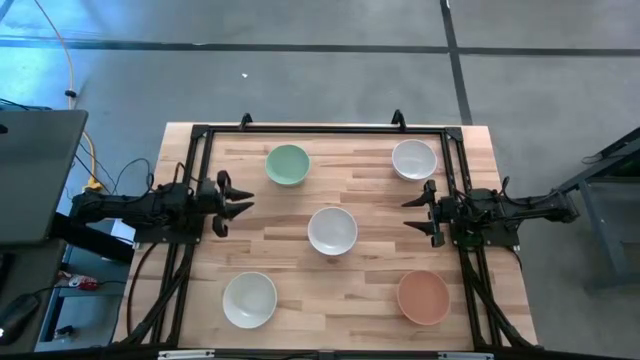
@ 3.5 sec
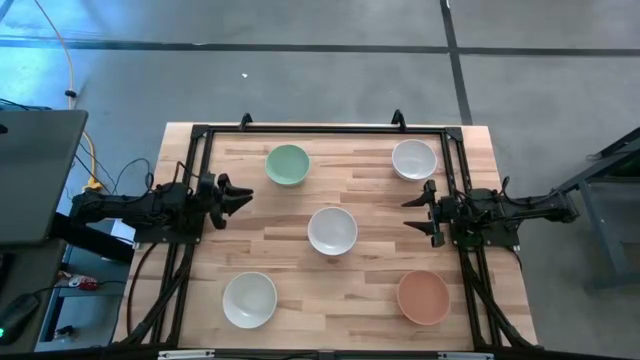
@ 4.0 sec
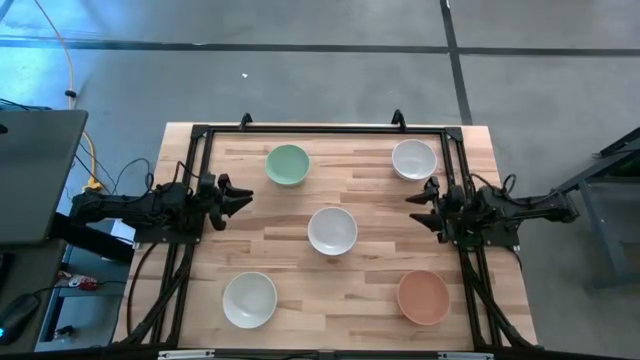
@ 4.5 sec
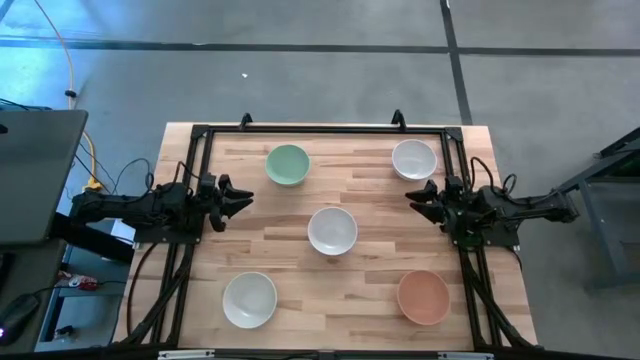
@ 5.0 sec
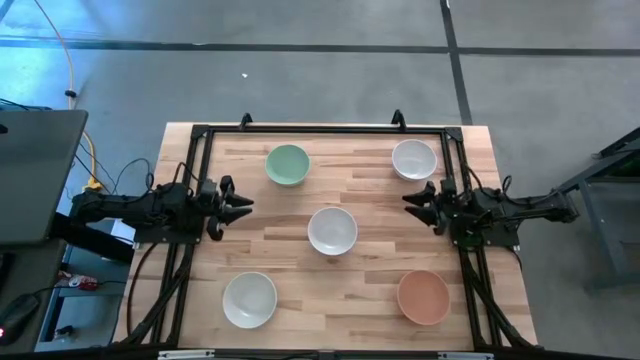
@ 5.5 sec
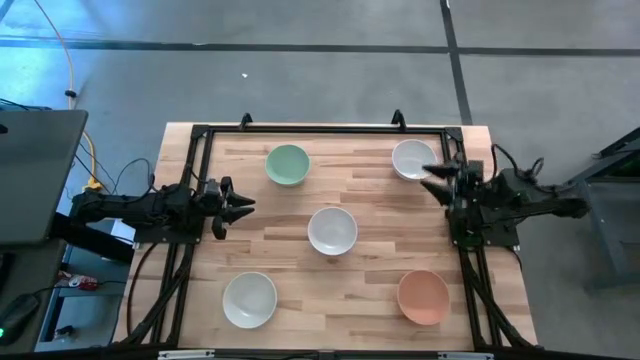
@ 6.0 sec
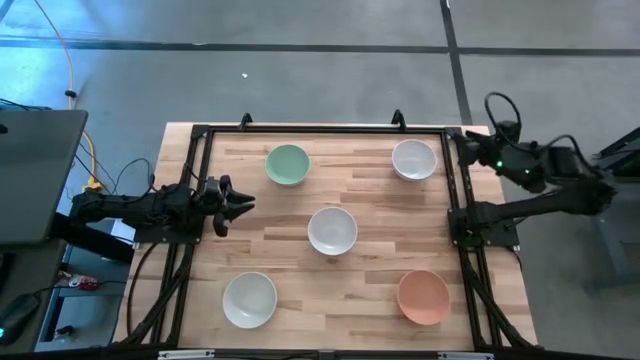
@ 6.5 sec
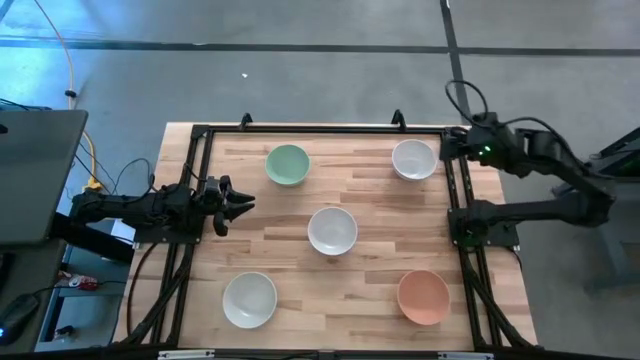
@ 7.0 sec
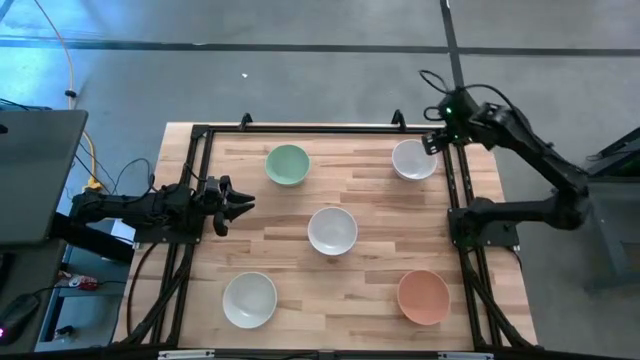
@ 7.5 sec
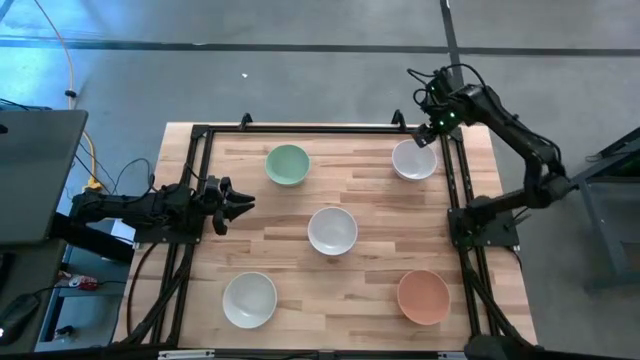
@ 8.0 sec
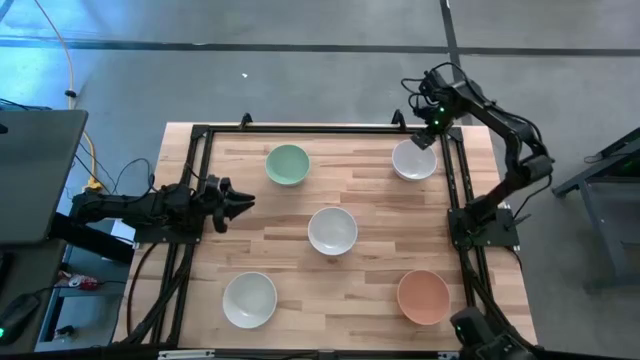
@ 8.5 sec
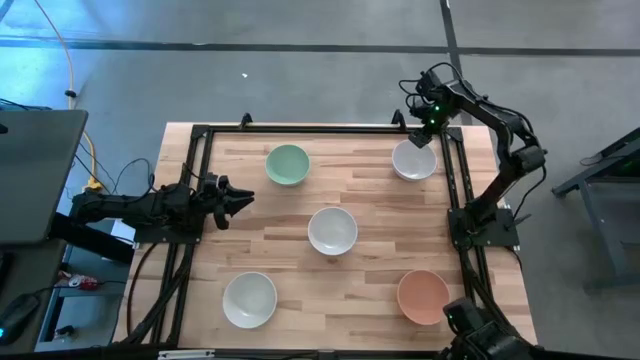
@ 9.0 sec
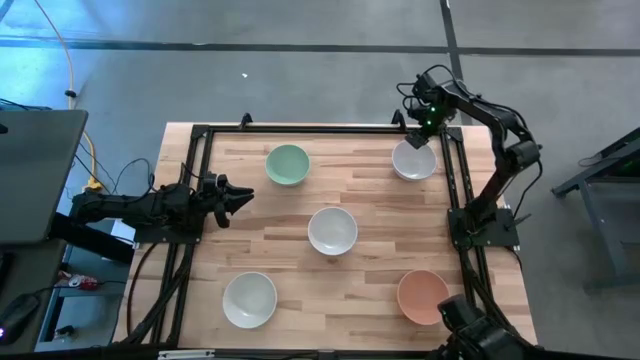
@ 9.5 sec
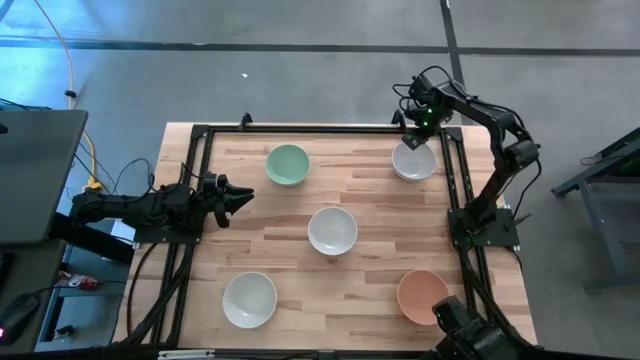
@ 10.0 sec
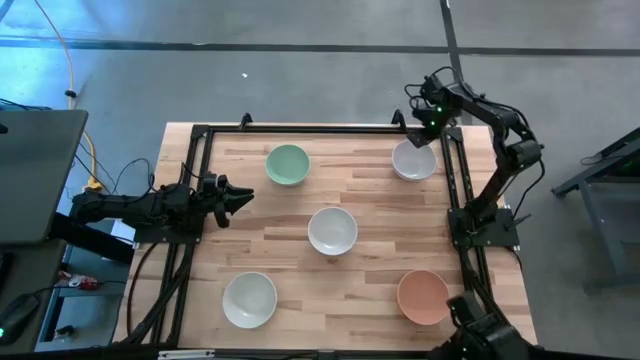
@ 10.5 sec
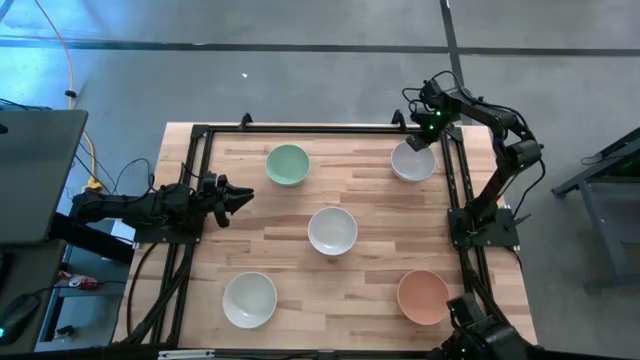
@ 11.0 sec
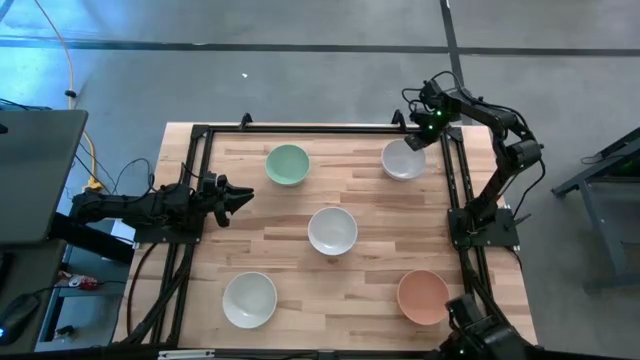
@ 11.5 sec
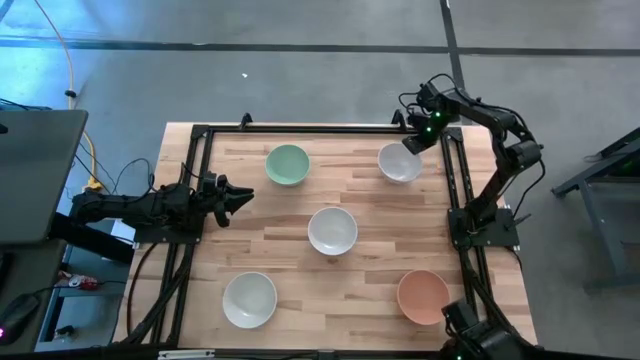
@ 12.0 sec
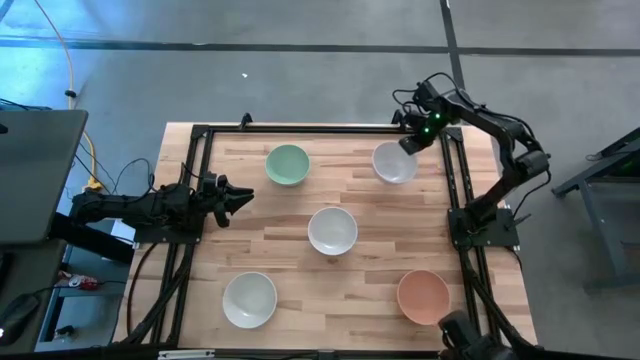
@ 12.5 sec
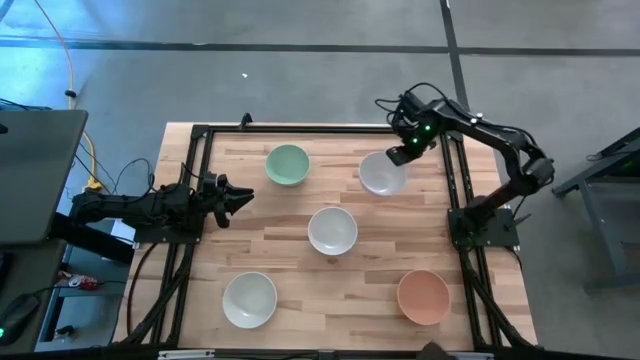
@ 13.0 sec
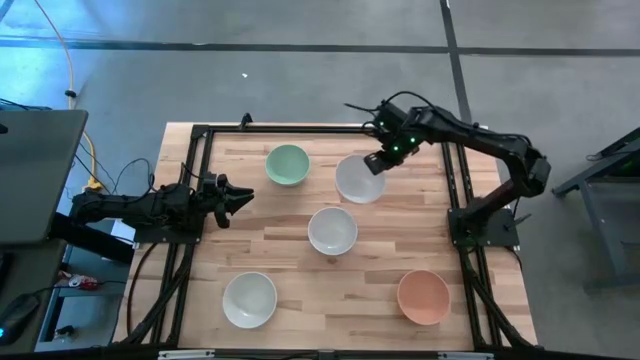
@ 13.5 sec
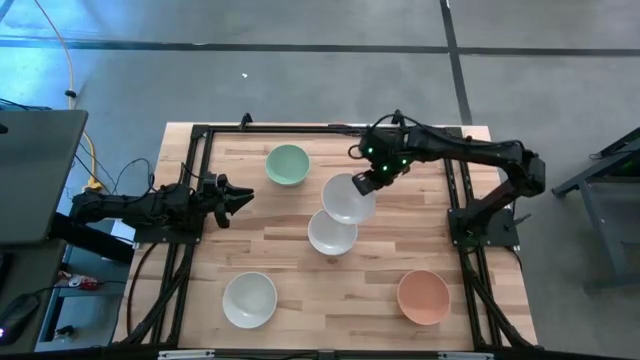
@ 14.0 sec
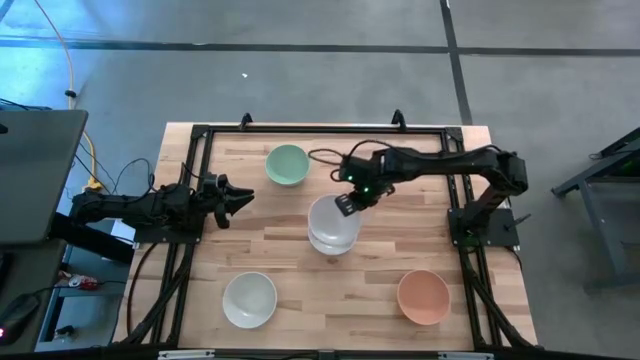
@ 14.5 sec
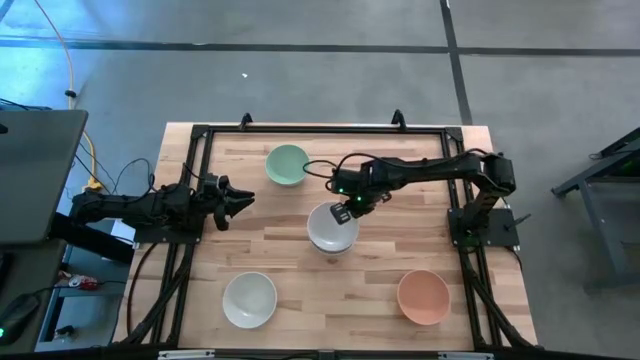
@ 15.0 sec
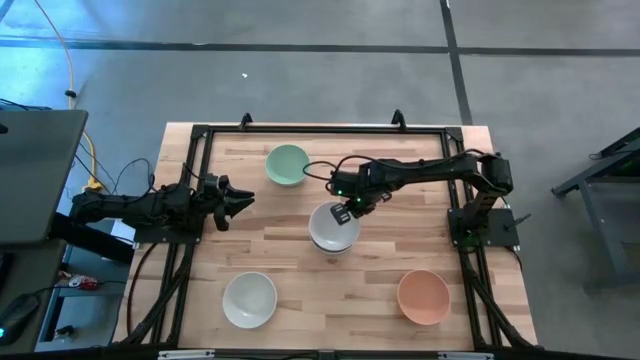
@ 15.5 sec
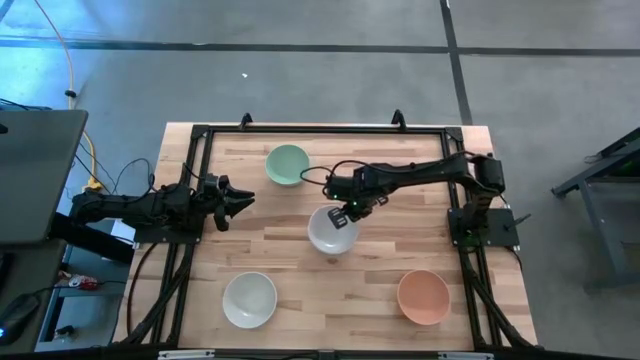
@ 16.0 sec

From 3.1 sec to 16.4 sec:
Task: Nest bowls inside each other
Stack the top white bowl on the middle white bowl

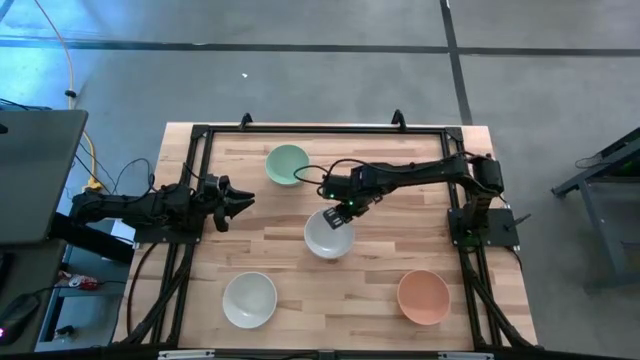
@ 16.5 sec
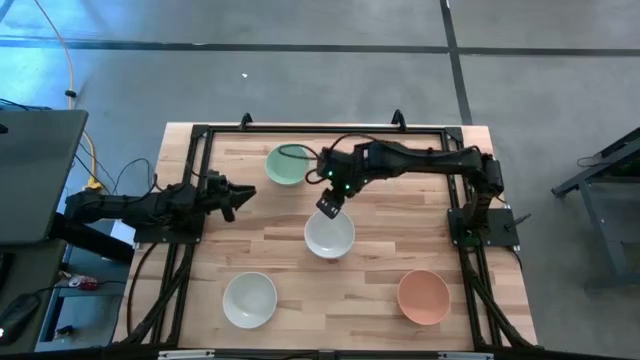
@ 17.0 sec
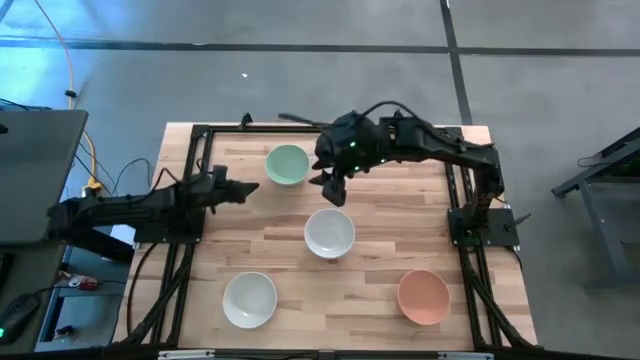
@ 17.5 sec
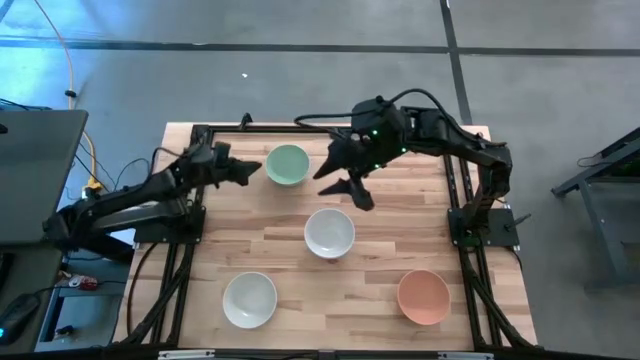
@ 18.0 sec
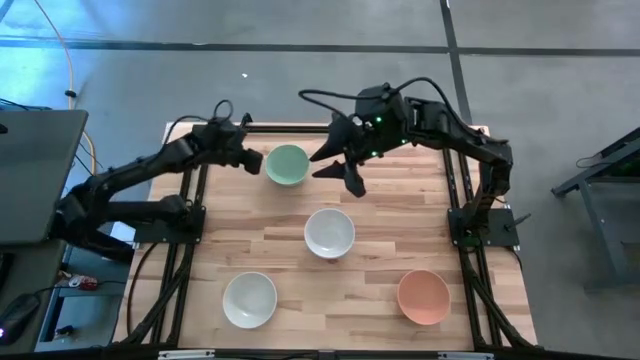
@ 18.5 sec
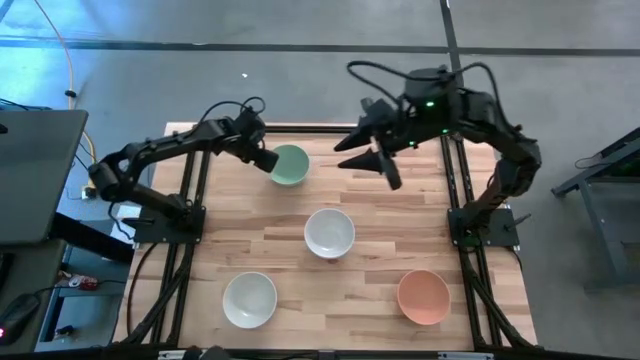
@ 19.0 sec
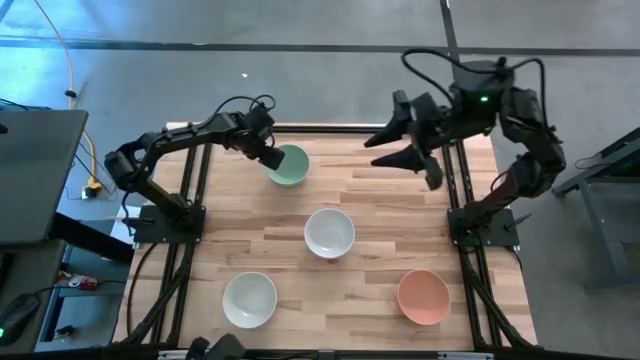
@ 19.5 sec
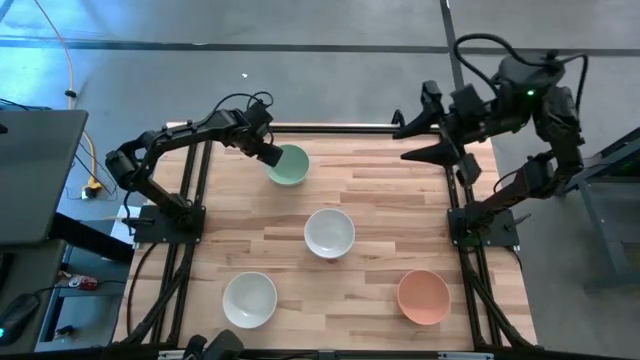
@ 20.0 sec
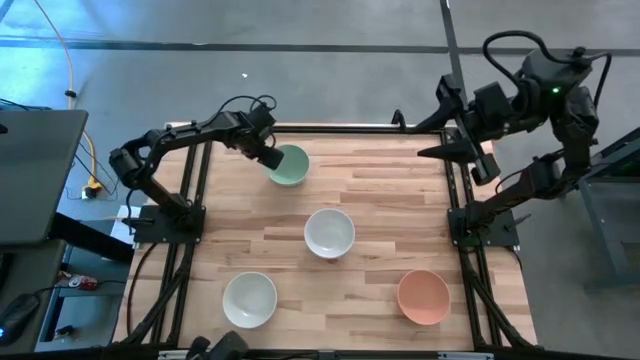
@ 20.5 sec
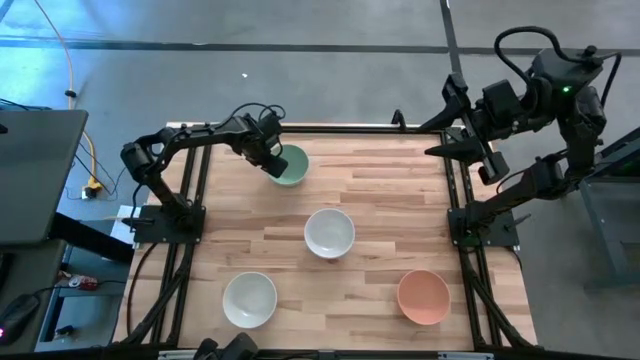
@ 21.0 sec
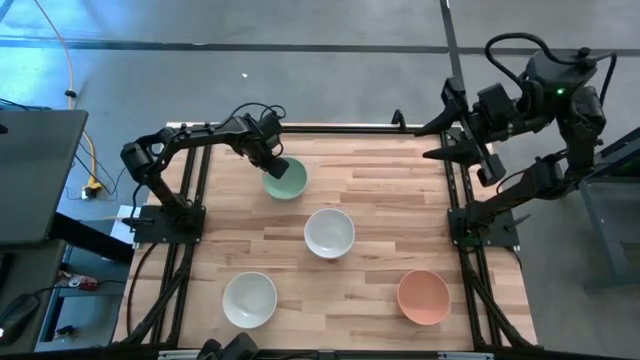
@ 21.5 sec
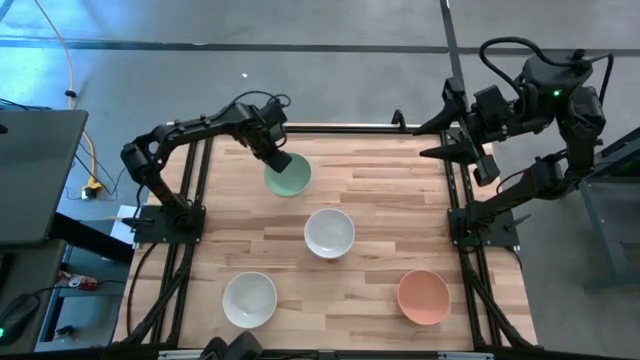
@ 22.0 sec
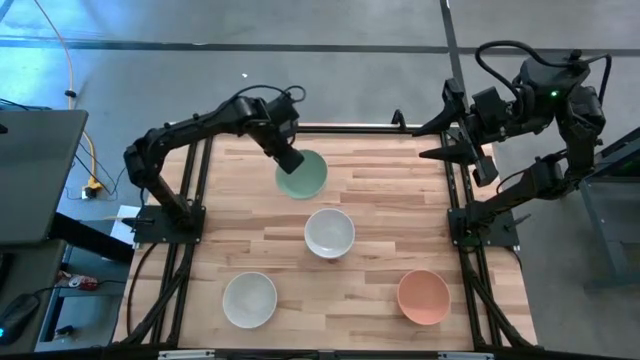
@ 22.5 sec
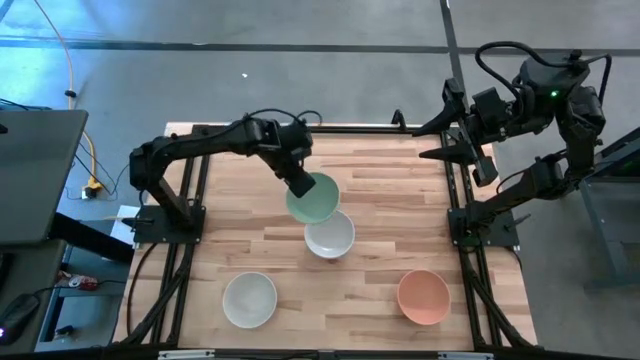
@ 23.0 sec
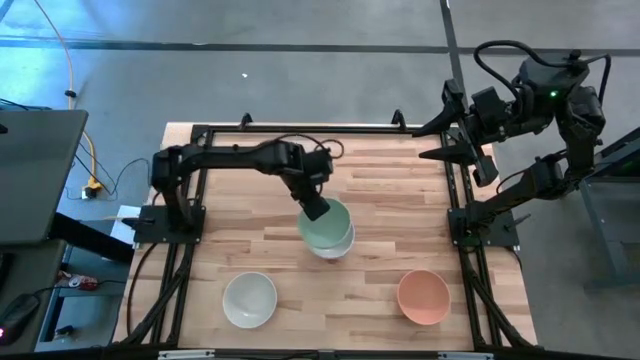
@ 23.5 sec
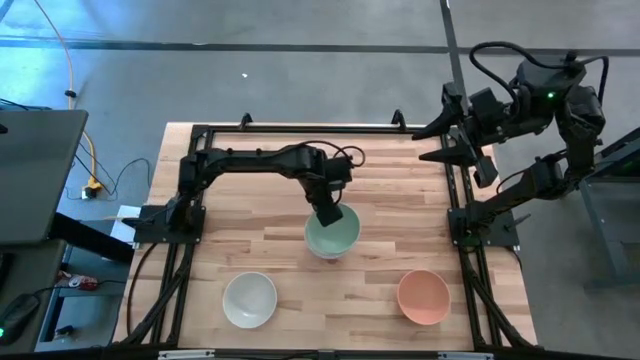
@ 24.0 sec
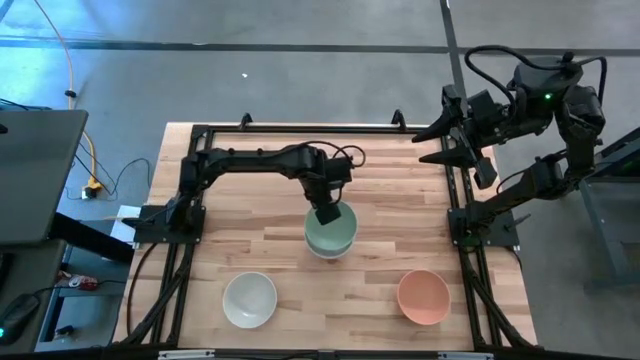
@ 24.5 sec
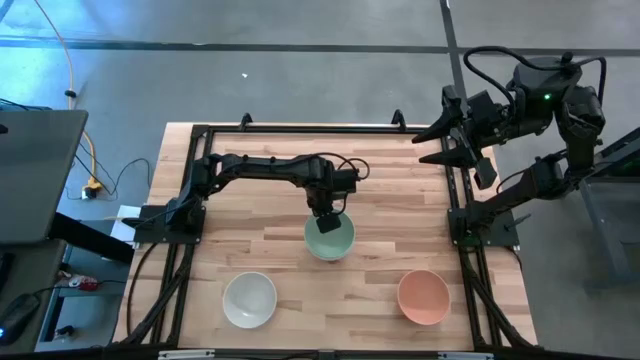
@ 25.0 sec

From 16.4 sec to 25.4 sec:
Stack the light green bowl on the top white bowl
